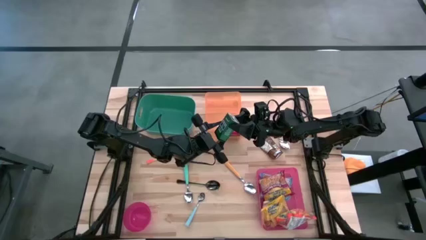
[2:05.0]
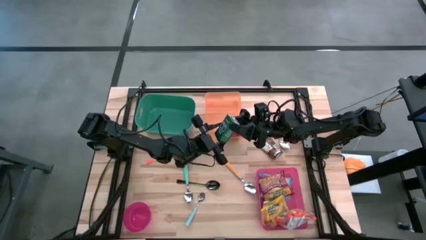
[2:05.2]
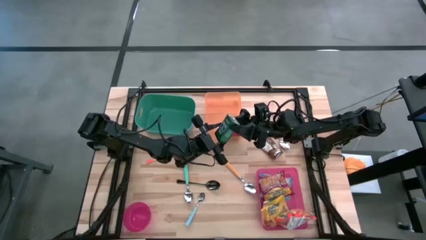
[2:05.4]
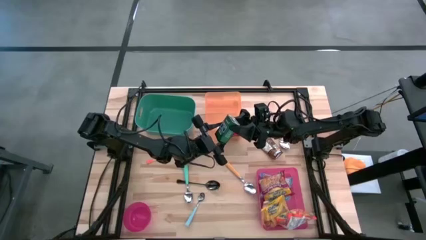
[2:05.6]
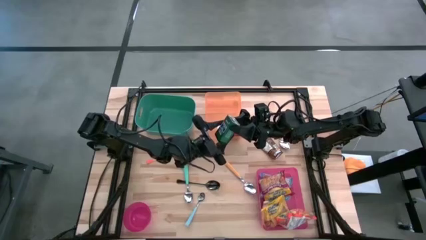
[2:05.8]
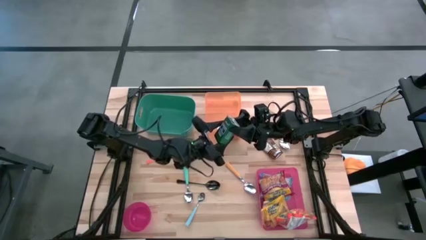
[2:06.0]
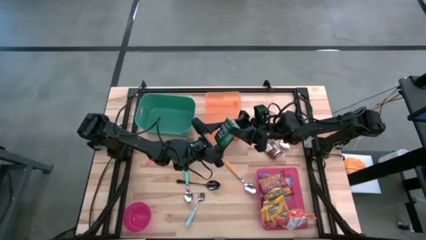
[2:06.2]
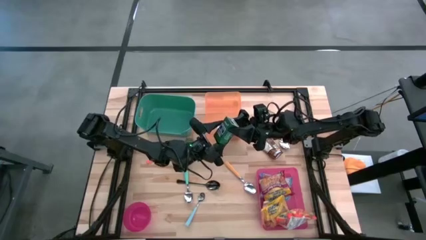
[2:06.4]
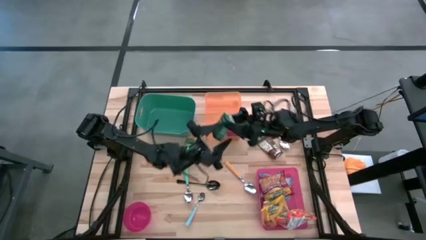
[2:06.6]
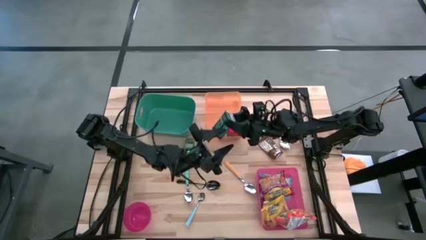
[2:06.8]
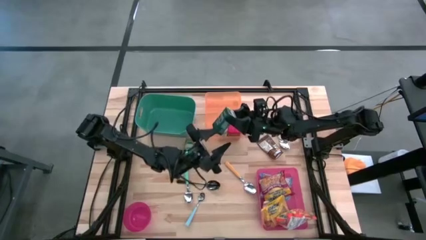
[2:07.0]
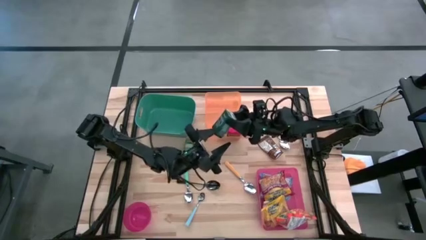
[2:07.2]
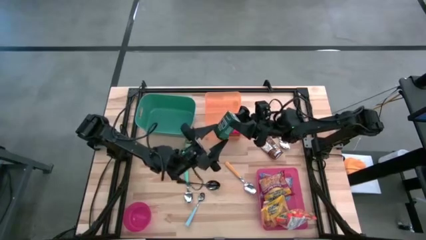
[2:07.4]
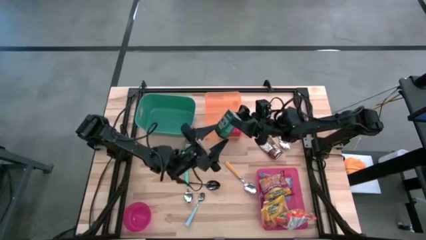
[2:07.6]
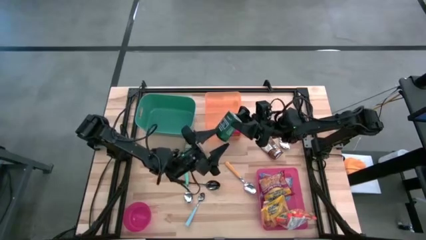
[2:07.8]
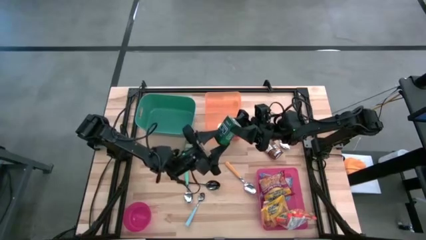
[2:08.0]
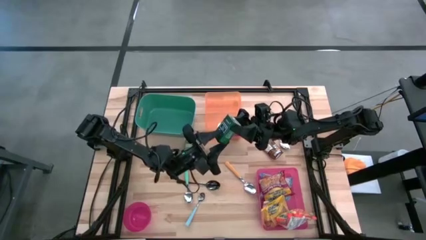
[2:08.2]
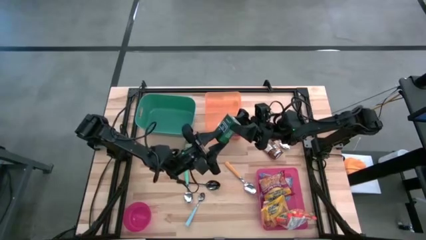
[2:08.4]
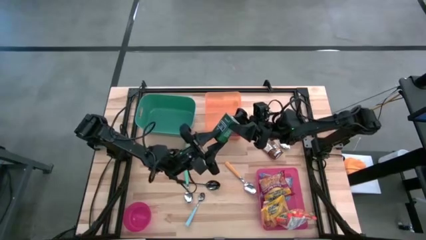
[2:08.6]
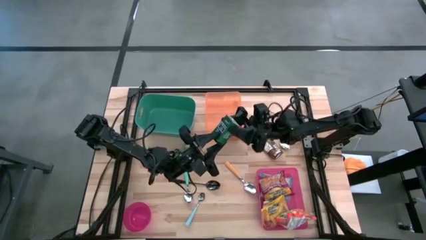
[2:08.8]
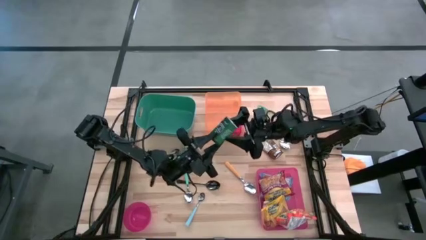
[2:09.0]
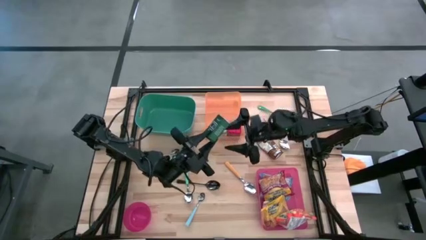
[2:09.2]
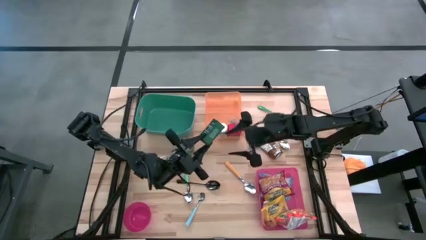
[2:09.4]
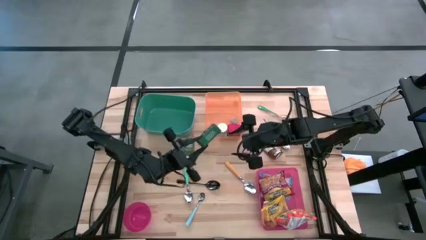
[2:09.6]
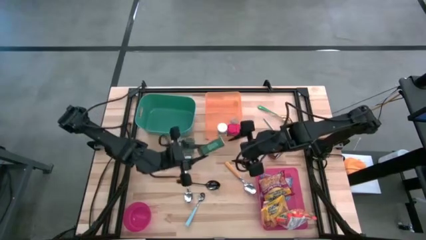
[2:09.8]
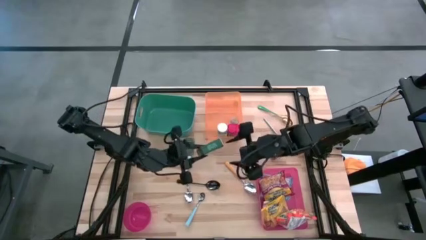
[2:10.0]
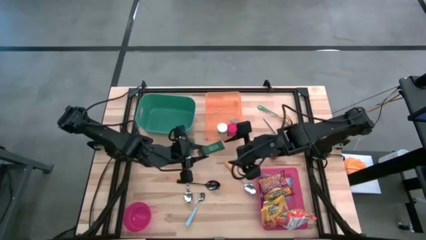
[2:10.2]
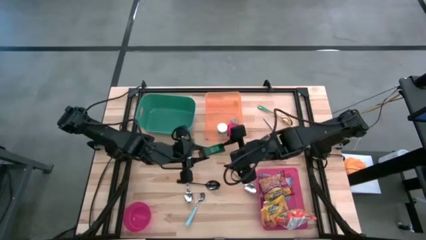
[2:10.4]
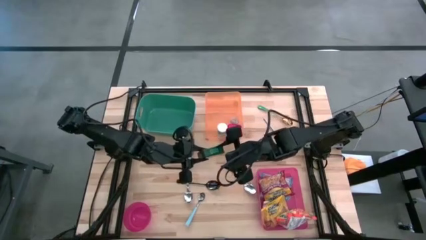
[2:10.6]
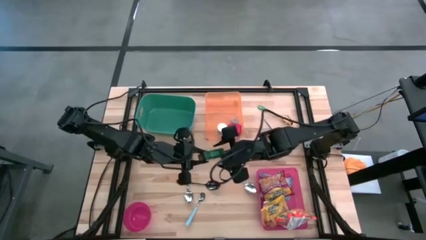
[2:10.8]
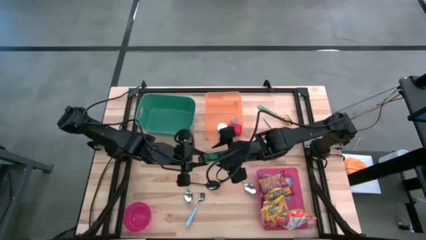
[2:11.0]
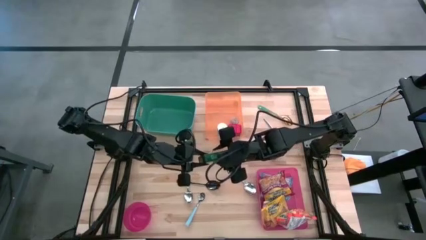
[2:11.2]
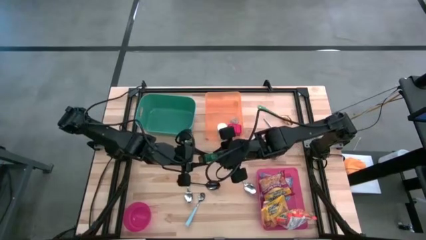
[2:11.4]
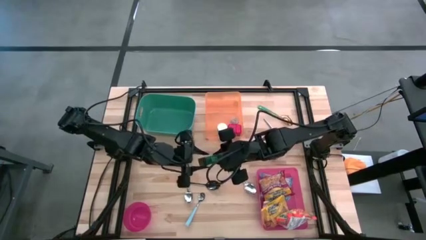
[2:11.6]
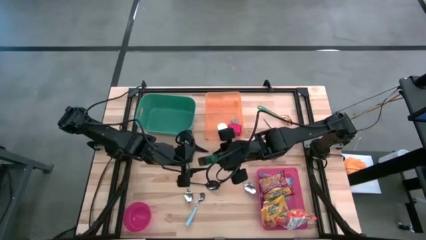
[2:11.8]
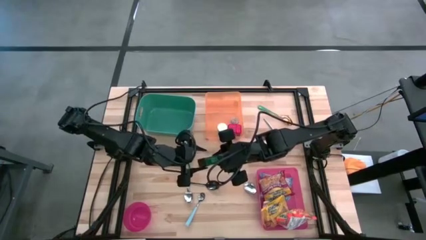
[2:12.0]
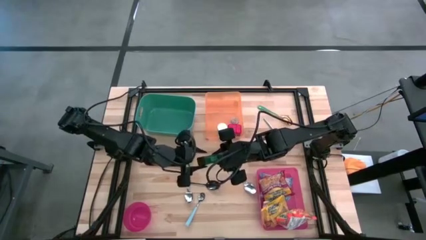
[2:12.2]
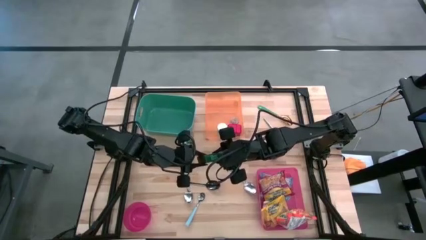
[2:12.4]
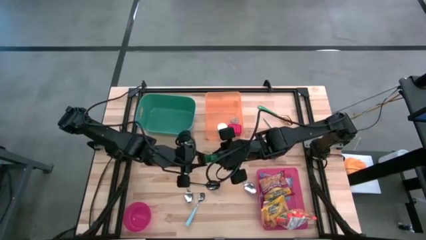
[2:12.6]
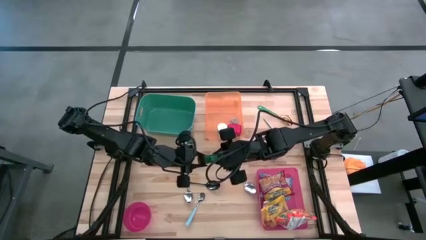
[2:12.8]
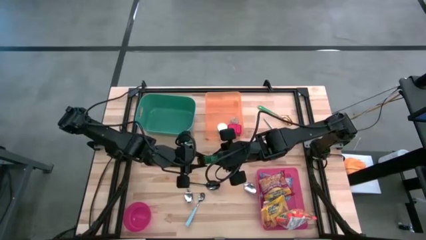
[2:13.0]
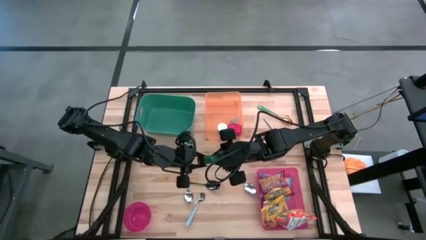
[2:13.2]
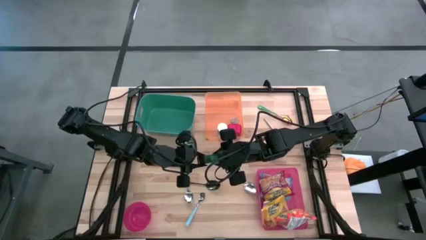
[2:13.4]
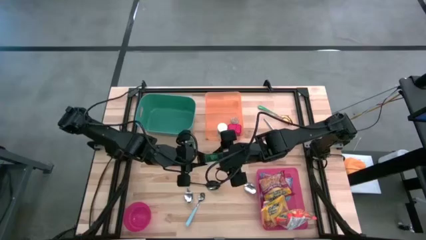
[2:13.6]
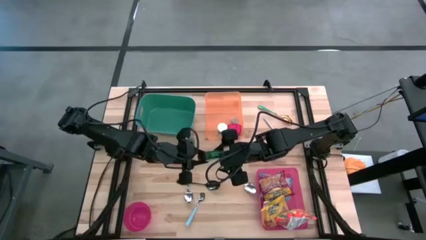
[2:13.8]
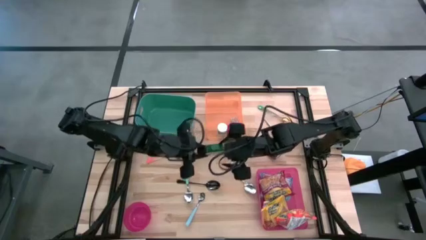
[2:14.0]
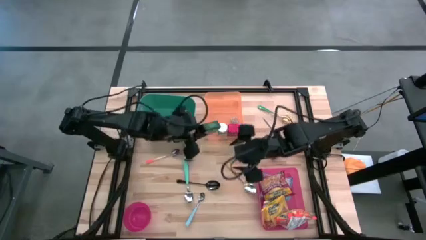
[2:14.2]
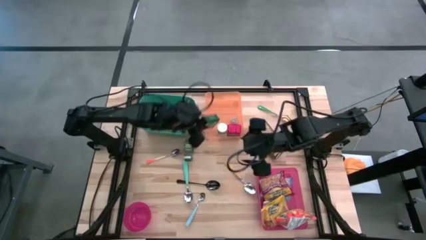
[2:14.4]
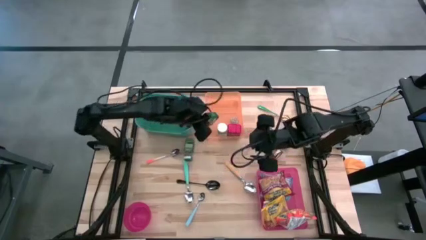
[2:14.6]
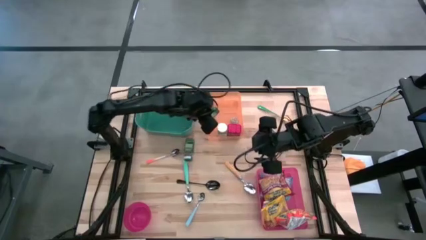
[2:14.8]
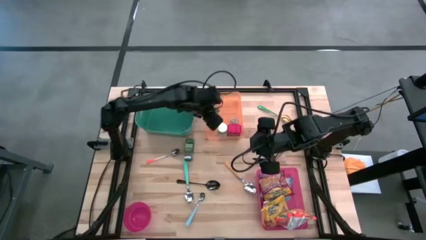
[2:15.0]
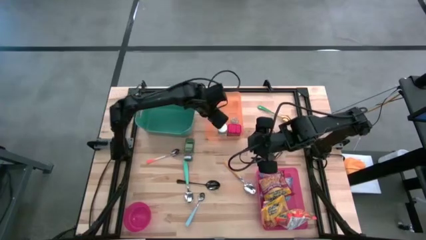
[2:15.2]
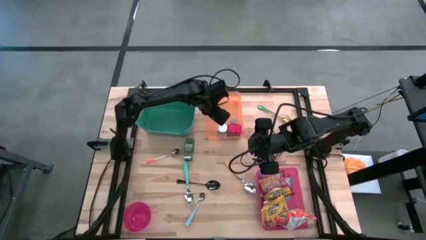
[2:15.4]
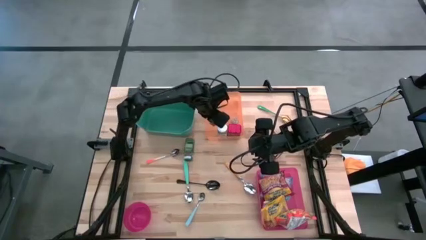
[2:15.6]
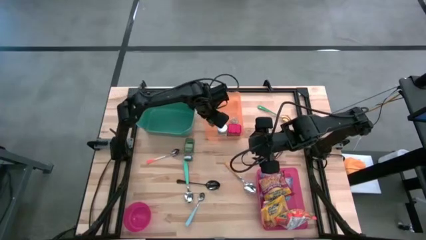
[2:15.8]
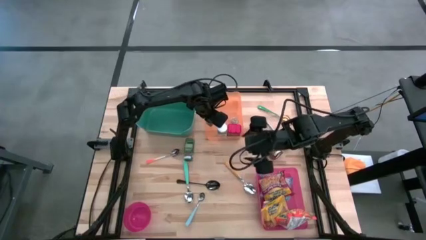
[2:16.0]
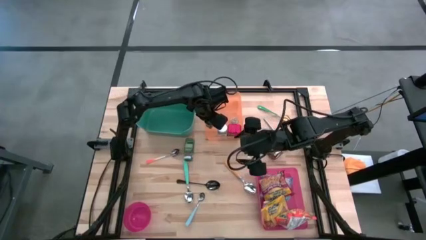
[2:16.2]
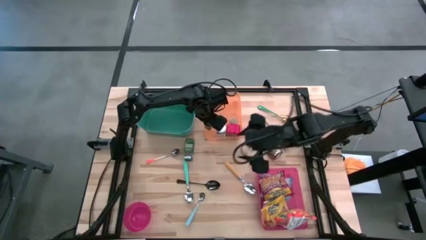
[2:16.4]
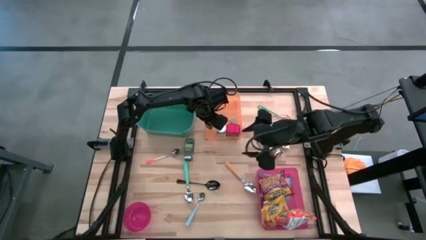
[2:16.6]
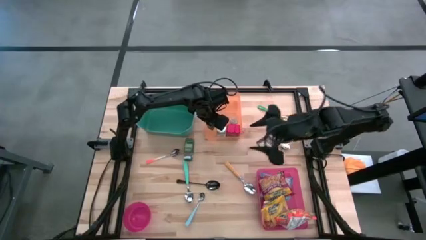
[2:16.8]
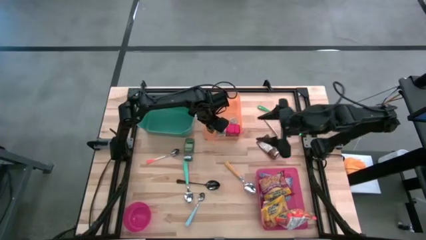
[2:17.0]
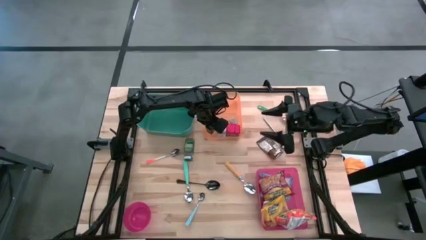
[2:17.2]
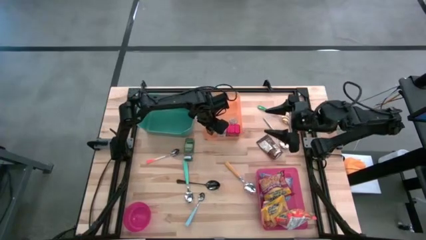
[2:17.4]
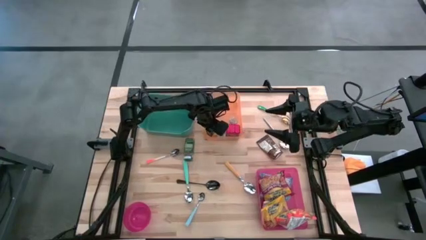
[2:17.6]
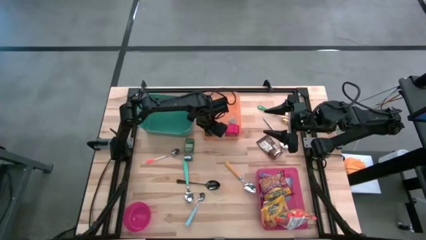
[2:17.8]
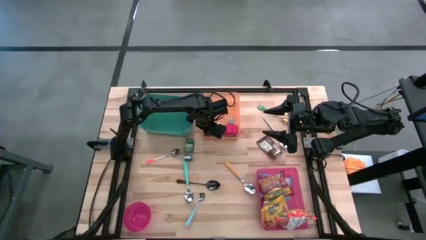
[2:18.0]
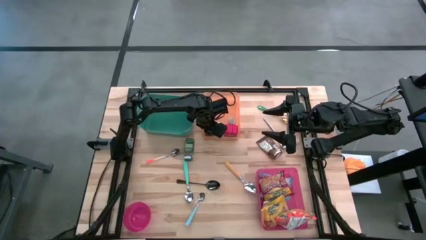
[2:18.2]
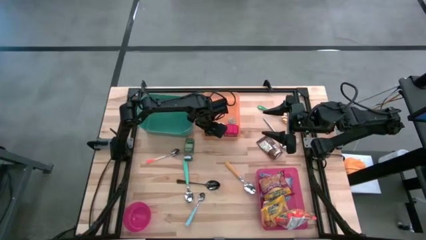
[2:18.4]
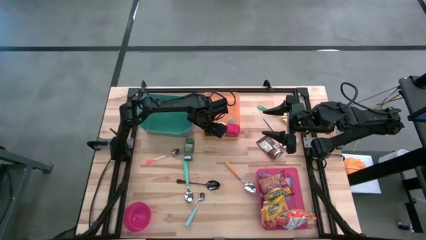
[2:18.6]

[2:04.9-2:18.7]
Put the black seasoning can into the orange bin

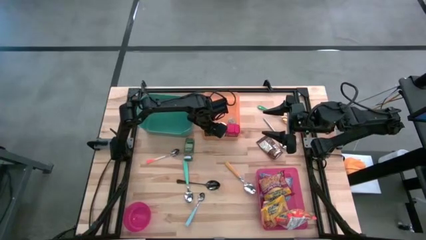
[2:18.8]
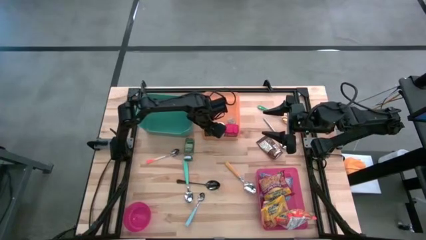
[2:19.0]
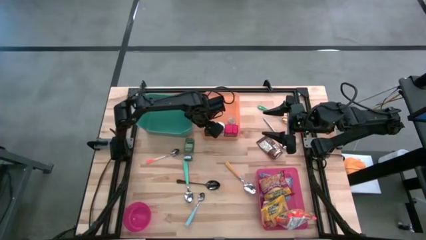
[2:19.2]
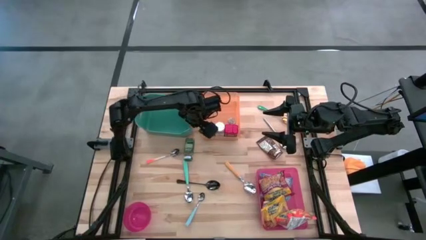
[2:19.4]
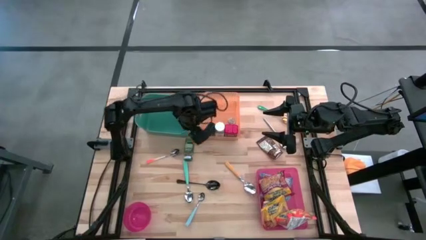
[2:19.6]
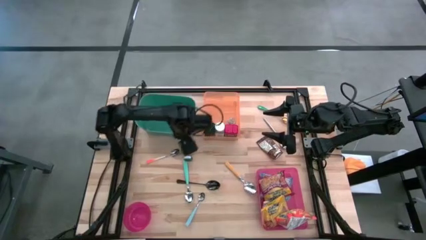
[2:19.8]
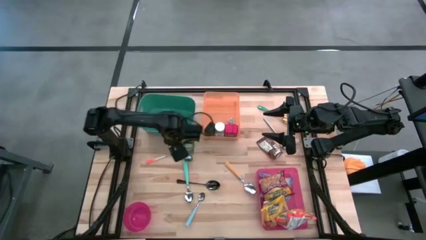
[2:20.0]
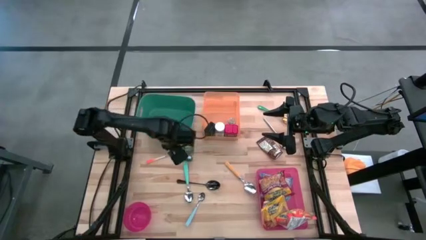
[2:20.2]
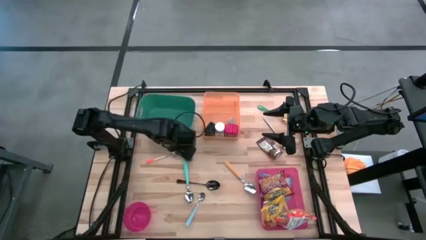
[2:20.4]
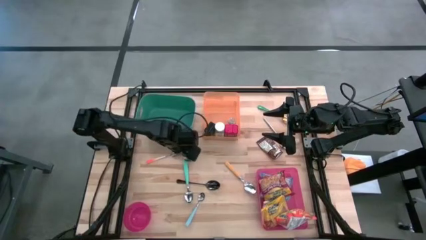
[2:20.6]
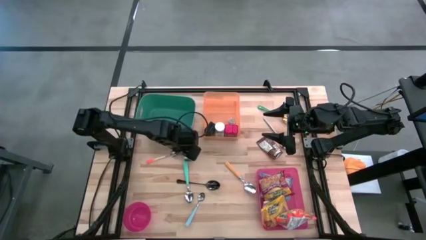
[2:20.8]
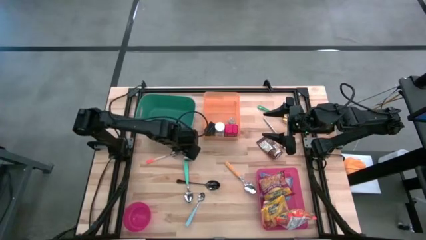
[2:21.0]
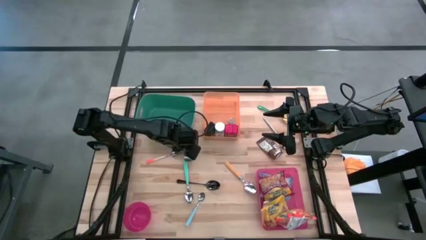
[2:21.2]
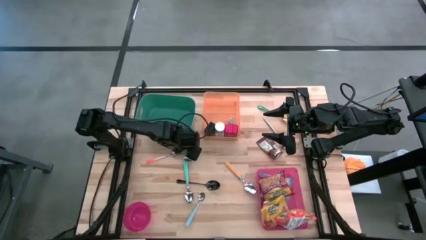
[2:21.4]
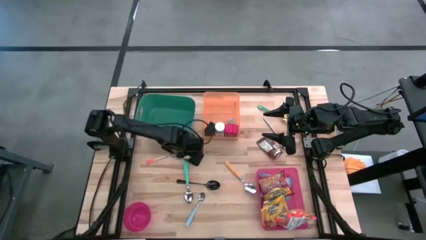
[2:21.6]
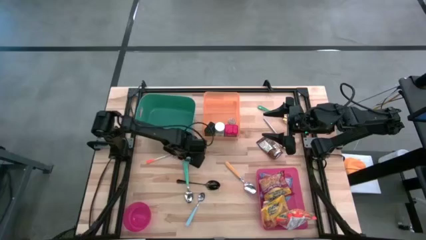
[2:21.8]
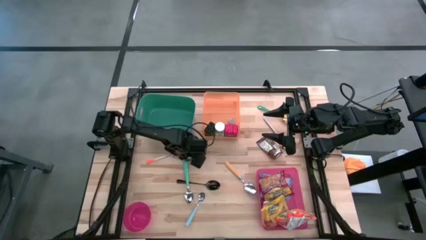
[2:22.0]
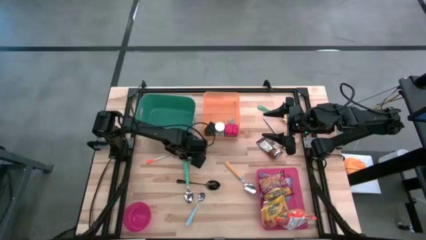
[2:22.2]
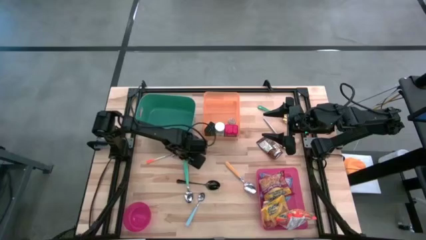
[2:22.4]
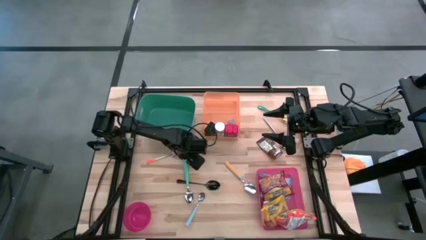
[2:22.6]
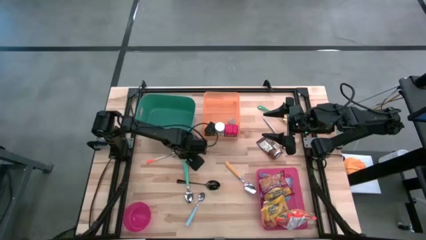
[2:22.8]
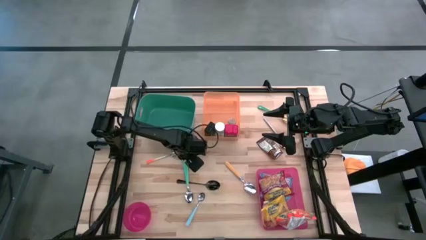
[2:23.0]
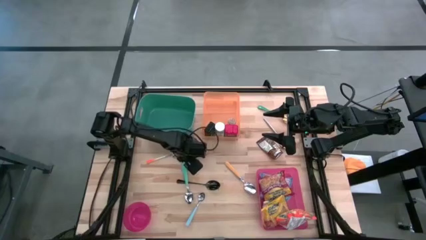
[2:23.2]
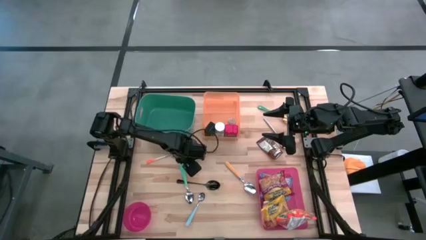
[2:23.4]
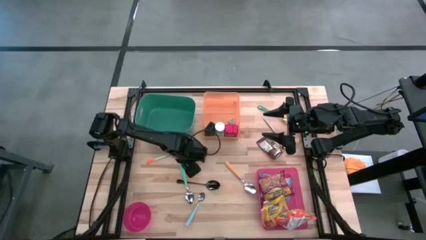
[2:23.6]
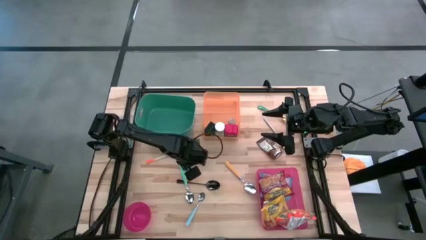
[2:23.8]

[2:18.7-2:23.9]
Put the green seasoning bottle into the orange bin
